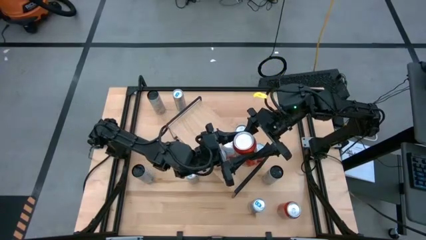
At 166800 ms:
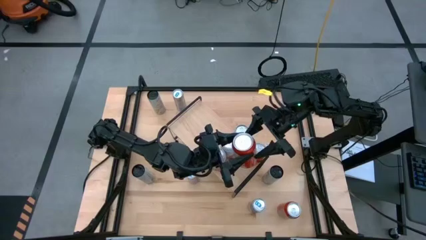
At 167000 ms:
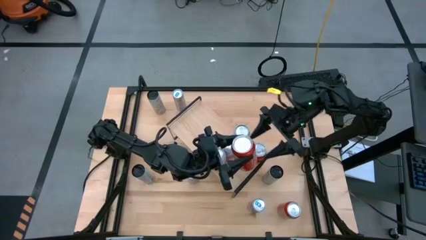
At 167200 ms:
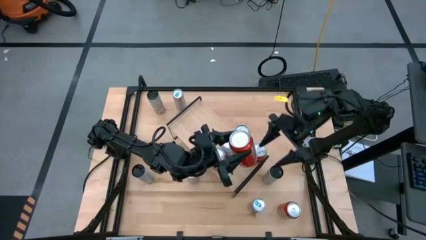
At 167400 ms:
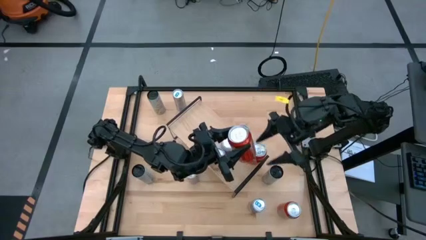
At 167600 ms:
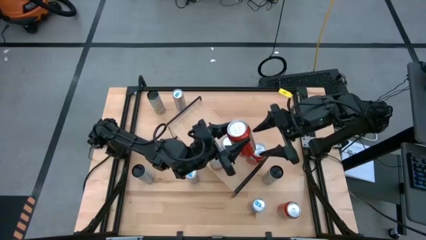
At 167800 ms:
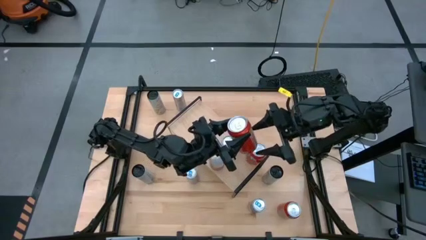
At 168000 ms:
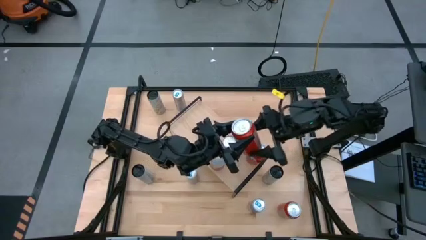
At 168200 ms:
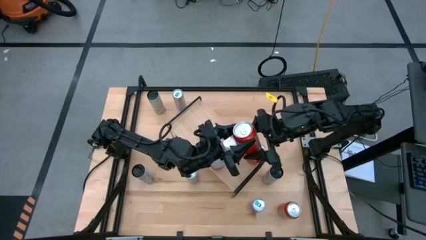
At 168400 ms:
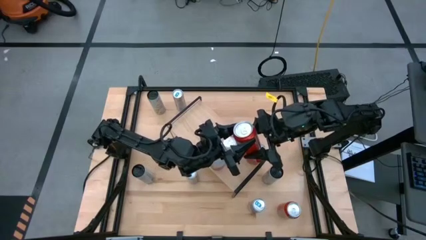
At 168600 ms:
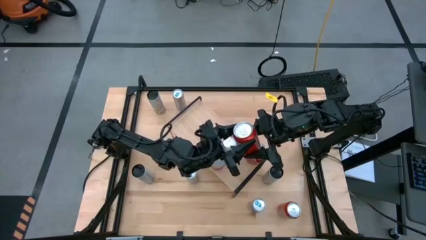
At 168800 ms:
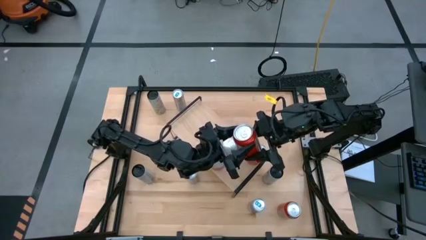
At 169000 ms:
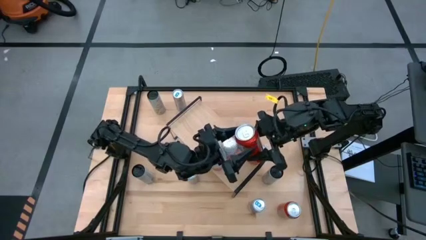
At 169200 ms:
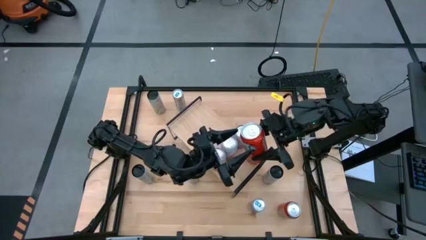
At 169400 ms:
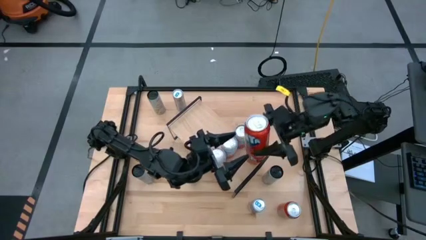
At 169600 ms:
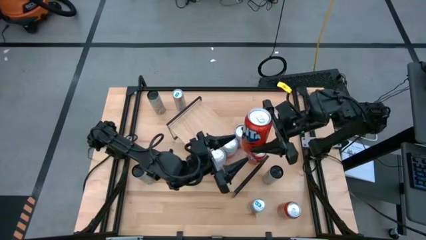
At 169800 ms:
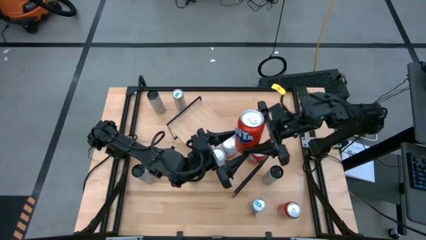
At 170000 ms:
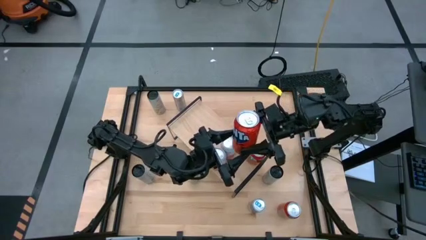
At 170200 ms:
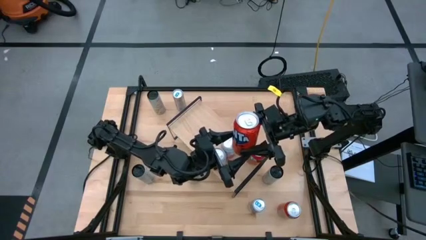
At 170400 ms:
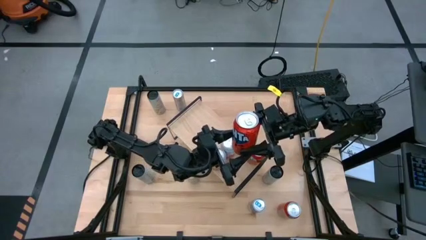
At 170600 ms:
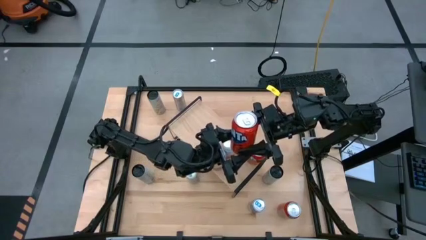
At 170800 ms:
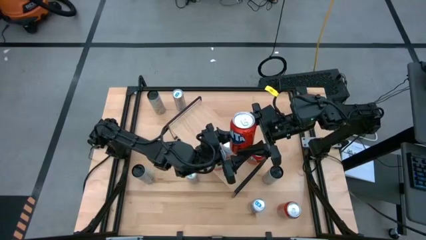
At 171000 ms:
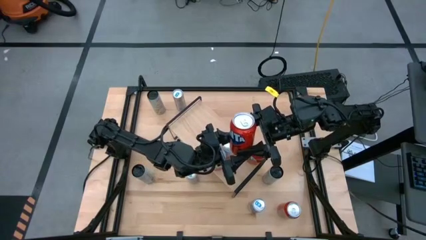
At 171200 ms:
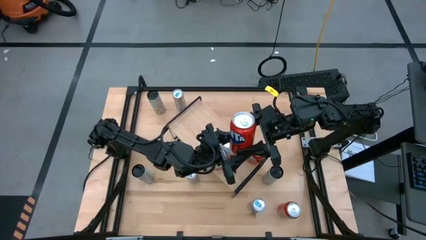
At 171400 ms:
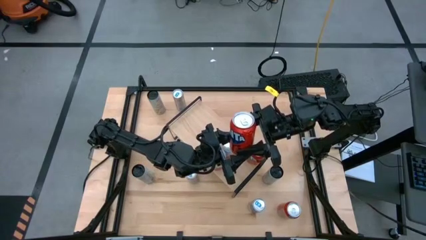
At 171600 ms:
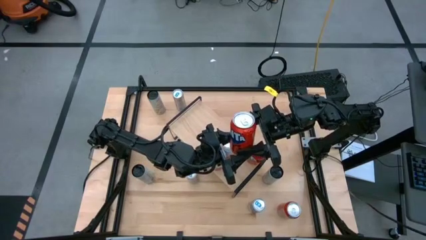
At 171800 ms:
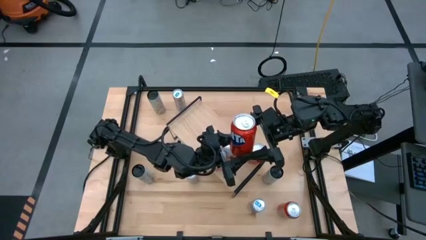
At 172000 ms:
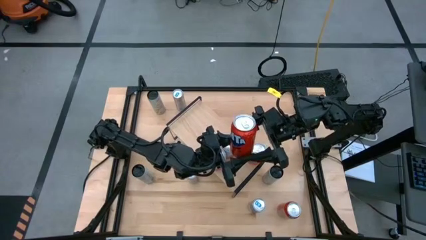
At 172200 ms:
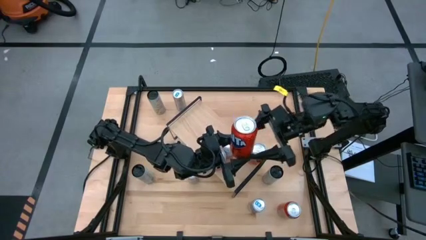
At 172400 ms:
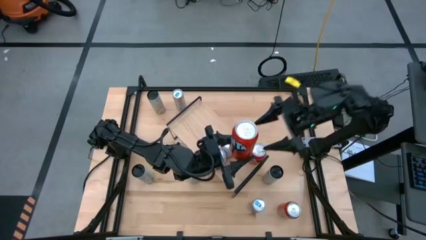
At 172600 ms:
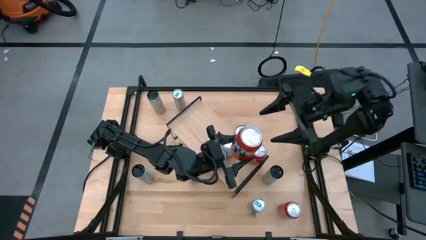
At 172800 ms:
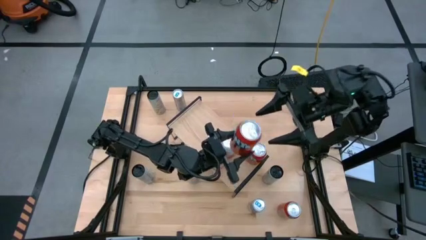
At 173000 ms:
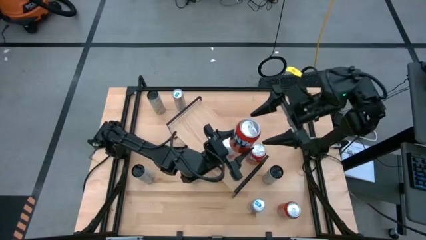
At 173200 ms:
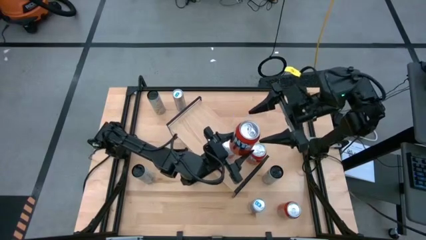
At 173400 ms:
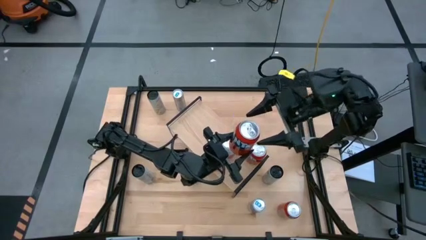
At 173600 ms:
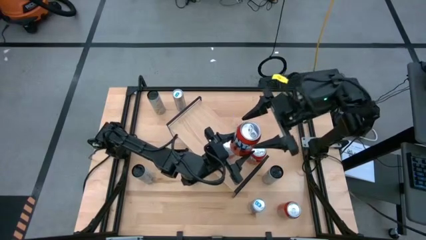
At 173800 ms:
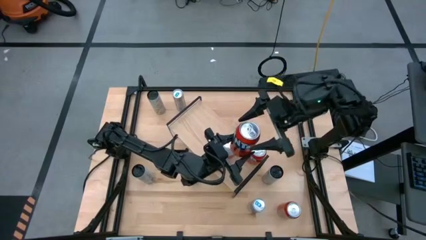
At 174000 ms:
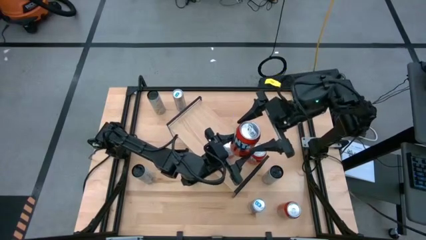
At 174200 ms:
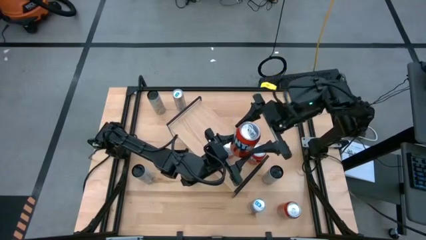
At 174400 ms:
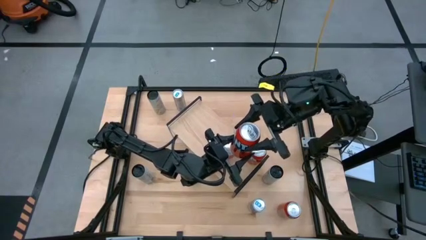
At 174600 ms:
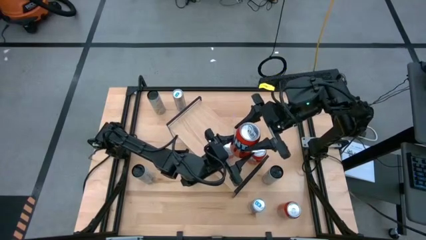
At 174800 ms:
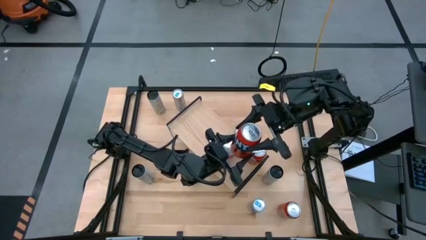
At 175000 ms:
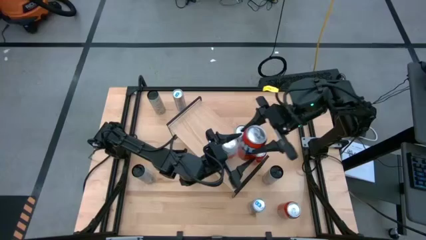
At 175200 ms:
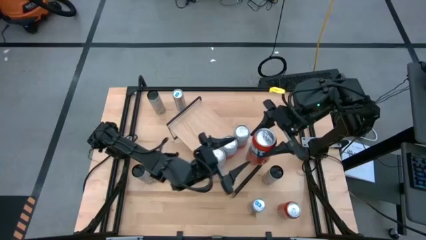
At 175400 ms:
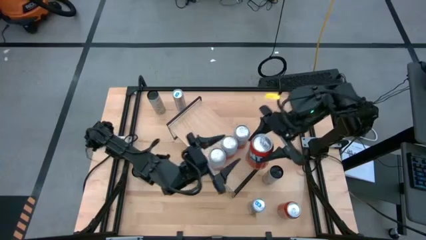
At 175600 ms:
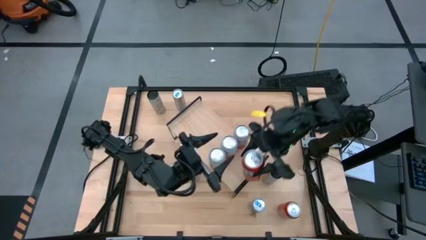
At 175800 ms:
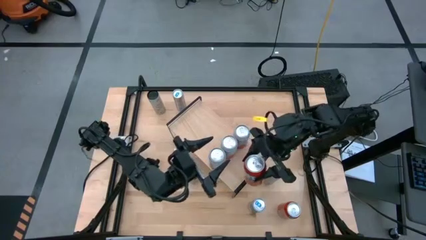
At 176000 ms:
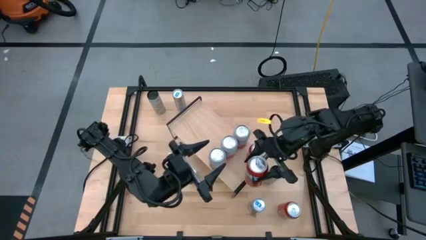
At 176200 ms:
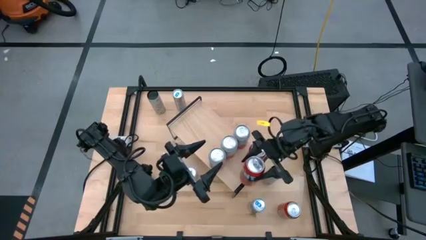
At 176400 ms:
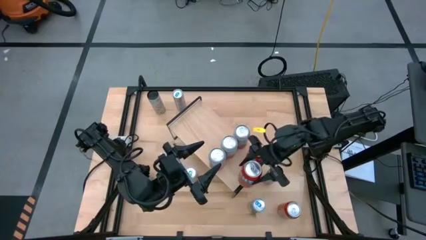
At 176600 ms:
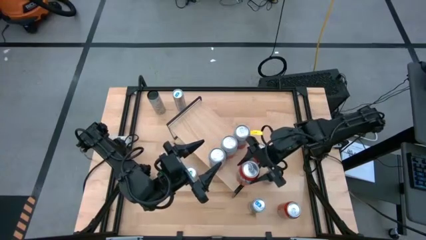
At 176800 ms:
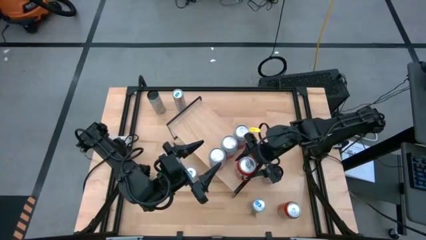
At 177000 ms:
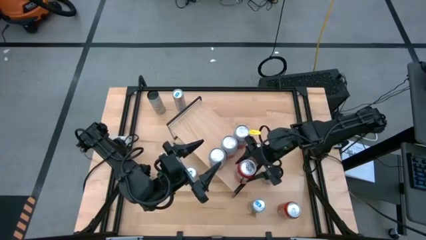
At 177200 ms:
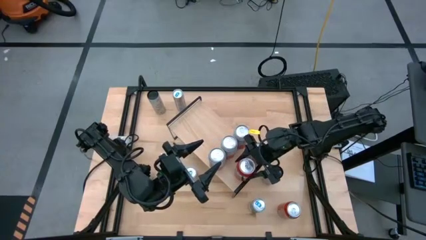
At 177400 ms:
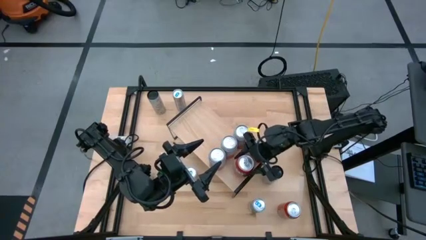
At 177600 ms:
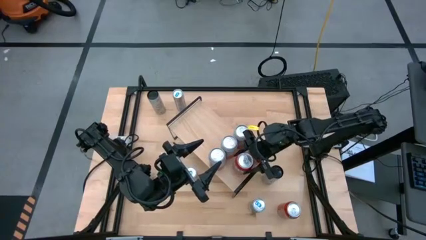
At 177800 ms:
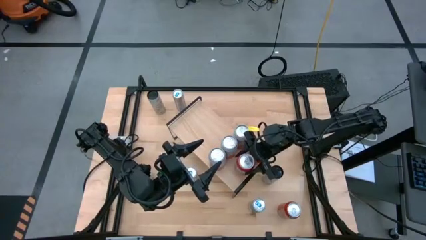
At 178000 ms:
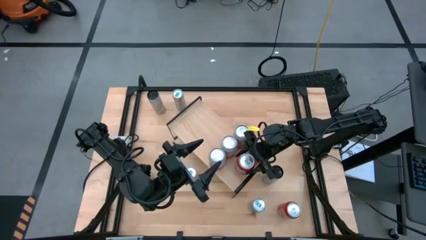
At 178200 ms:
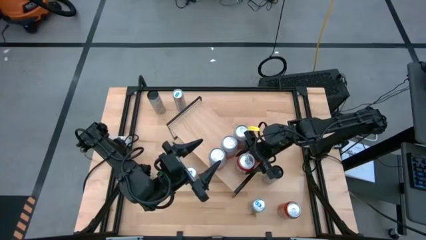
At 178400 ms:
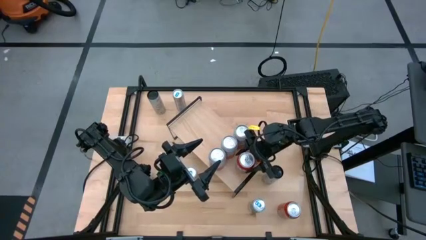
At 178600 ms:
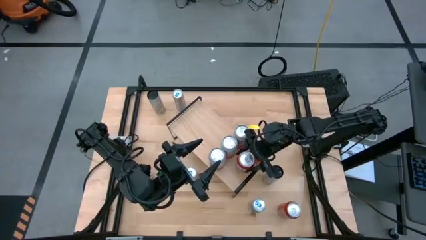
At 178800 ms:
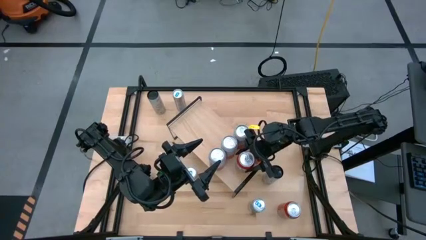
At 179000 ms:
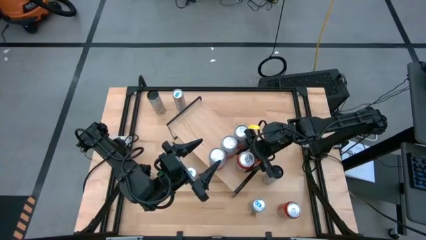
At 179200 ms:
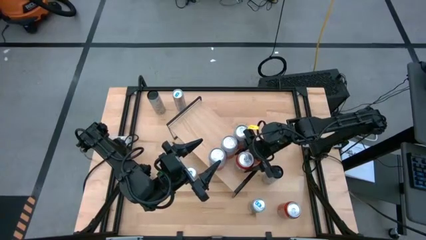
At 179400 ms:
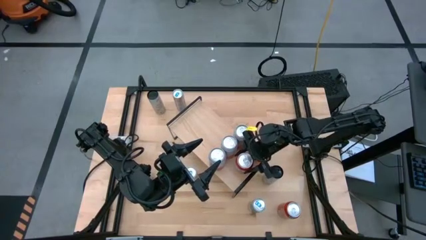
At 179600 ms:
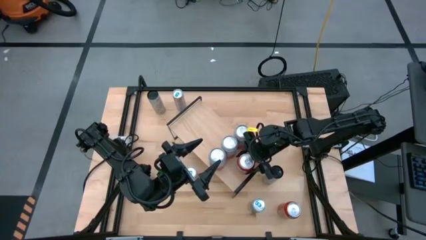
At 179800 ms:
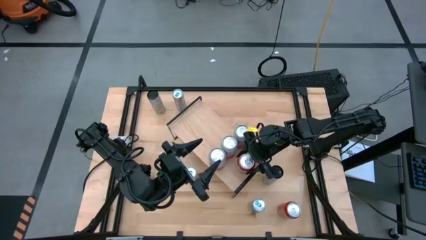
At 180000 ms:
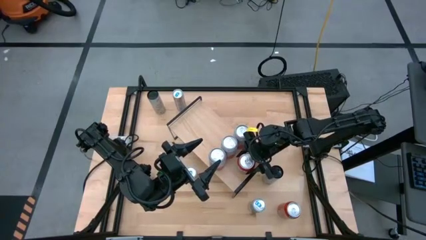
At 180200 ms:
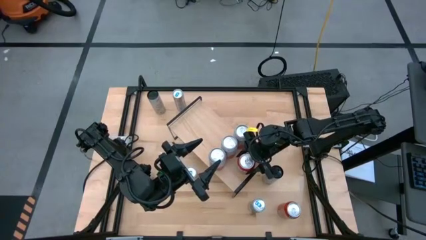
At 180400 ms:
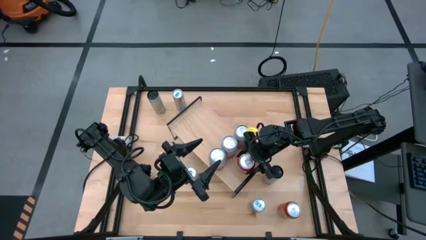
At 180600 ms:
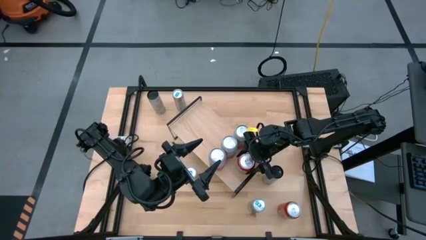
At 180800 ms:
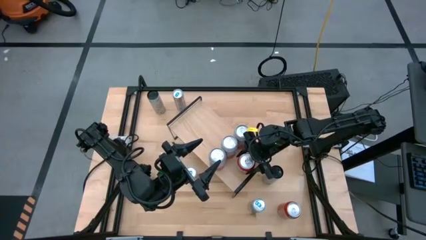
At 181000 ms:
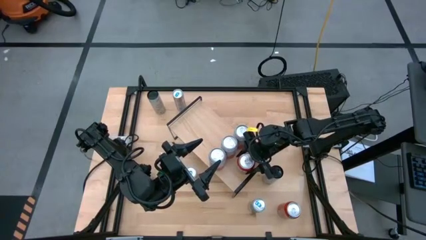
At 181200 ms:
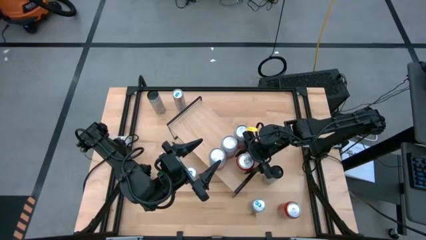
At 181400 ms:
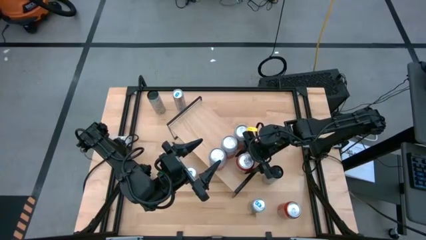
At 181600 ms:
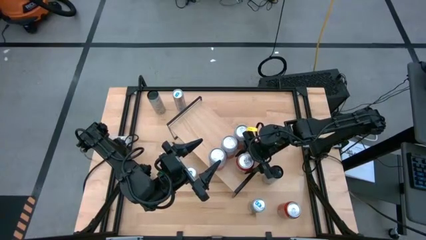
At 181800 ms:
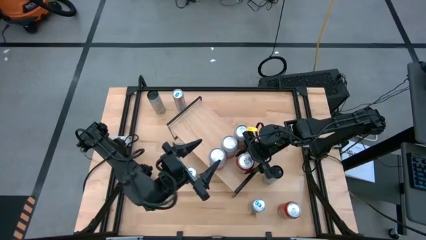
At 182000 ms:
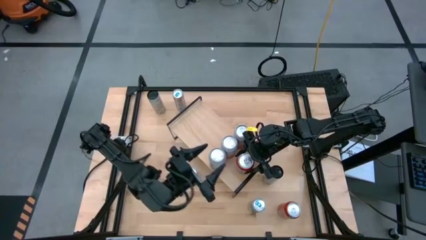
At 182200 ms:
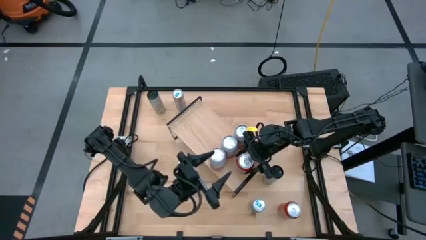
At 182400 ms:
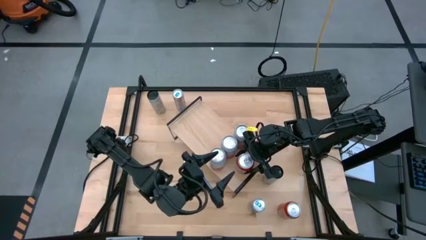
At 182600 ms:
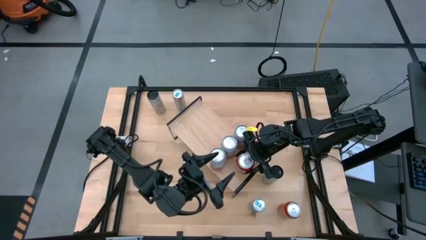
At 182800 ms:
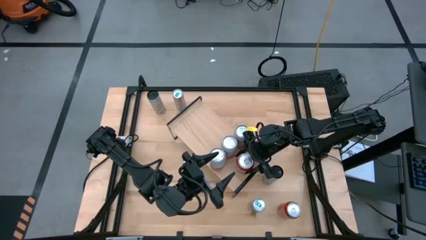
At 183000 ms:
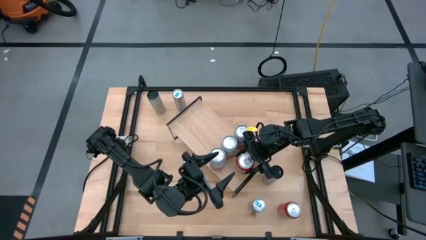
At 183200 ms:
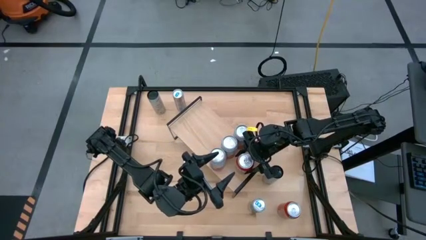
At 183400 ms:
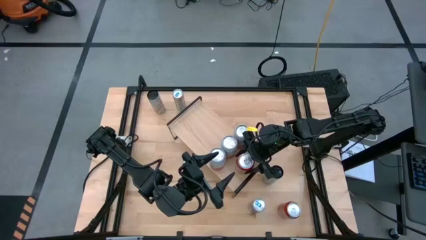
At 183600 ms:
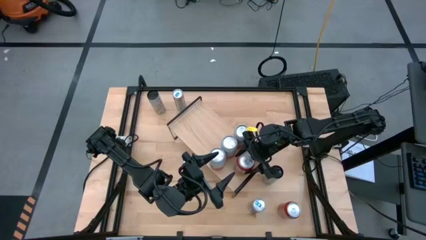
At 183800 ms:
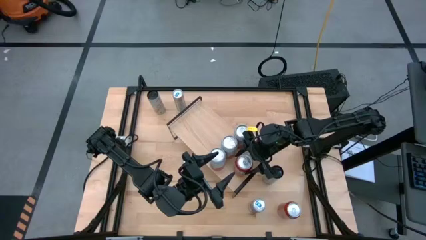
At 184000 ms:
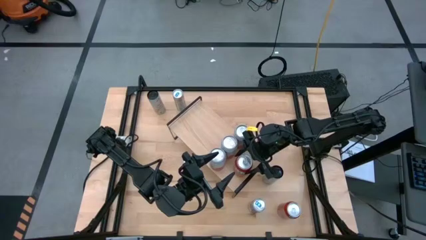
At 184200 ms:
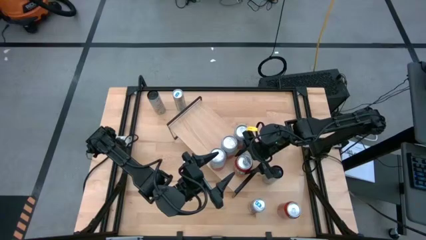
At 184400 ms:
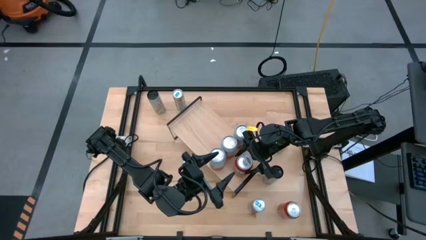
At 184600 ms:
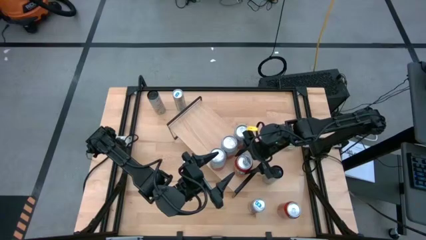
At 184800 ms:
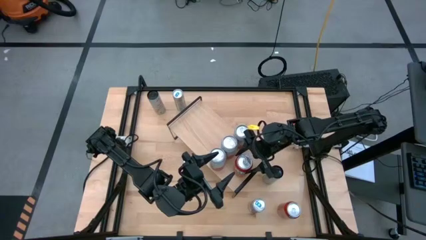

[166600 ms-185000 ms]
Task: Place canned beverage on shelf
Put the top red soda can on the shelf aligned with the other red soda can
